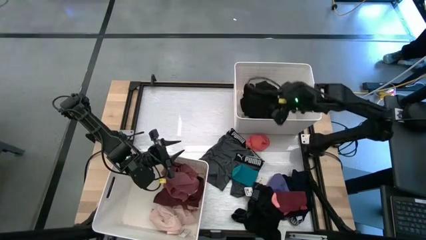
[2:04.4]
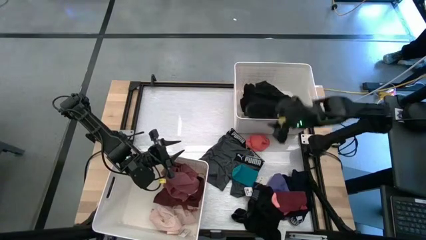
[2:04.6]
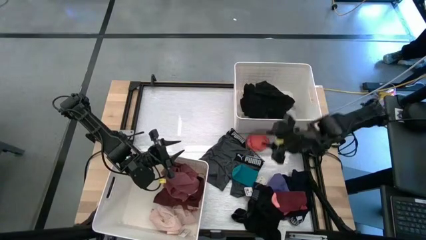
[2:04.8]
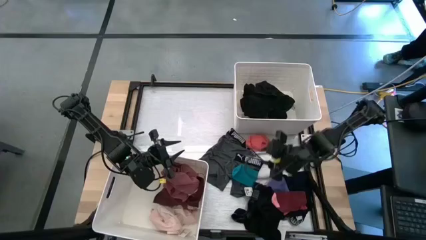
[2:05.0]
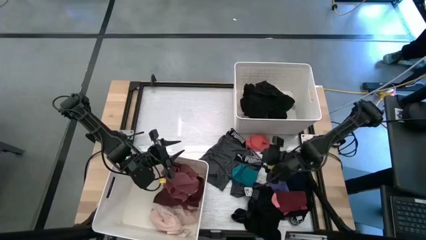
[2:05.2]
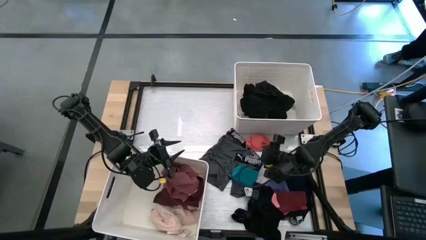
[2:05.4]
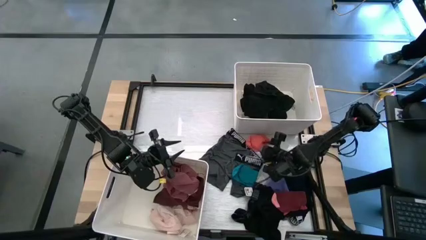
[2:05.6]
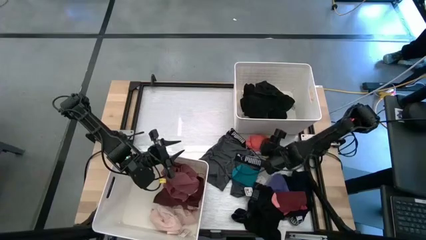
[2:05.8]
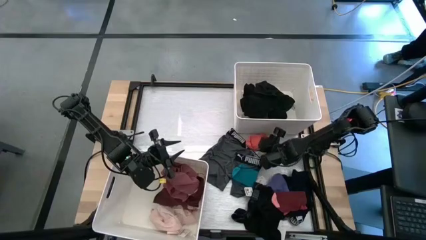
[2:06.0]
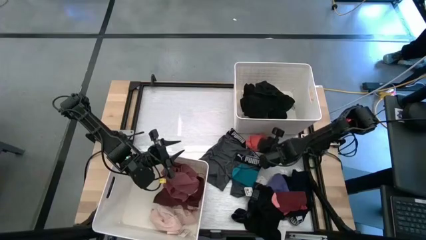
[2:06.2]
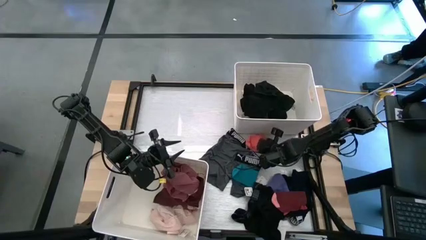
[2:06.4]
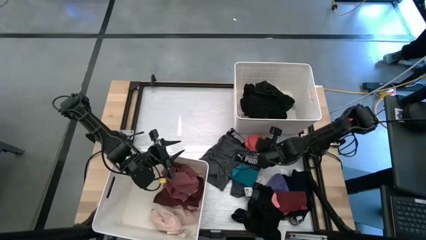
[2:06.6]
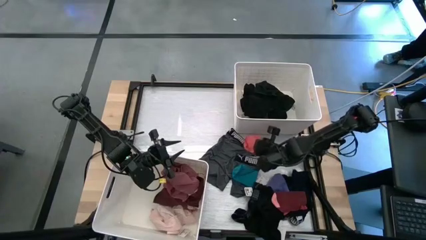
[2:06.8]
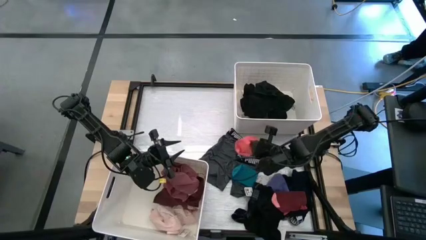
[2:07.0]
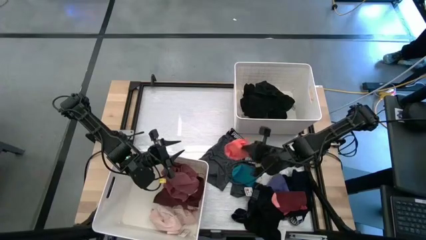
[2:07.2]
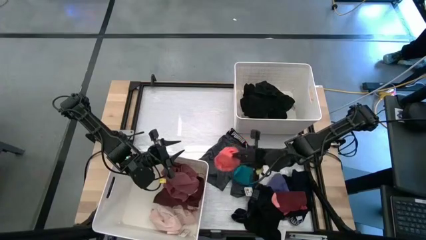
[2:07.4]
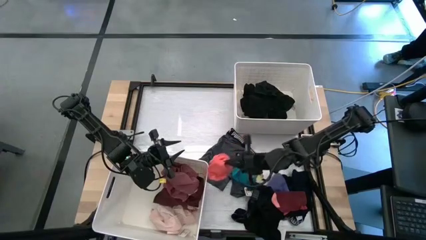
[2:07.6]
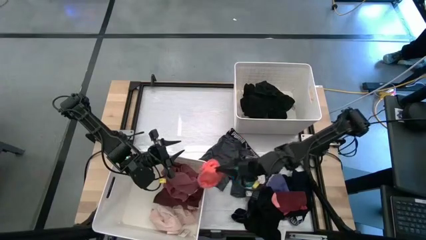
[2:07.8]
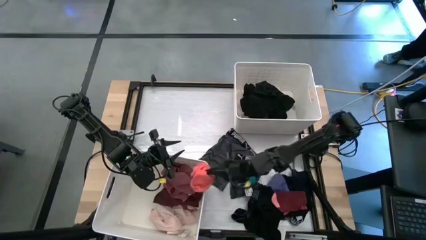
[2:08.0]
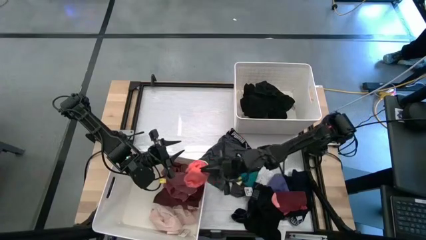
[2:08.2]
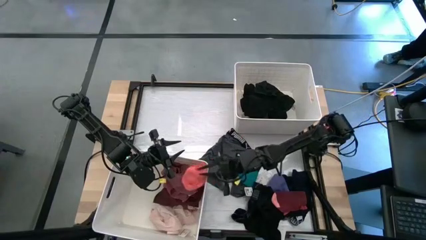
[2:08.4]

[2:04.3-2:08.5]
Task: Sort clothes
Put the pink sock into the bottom white bin

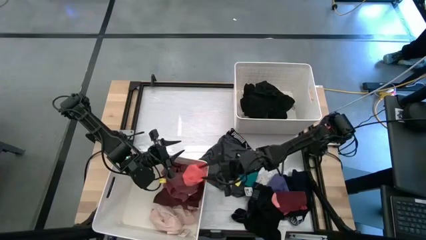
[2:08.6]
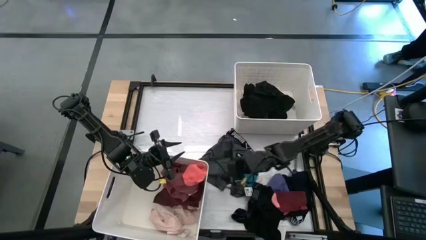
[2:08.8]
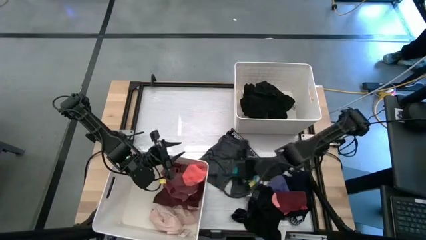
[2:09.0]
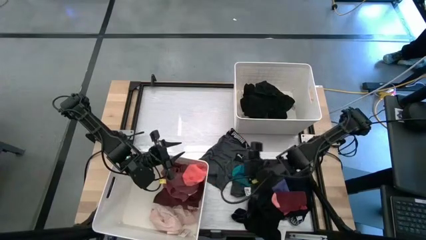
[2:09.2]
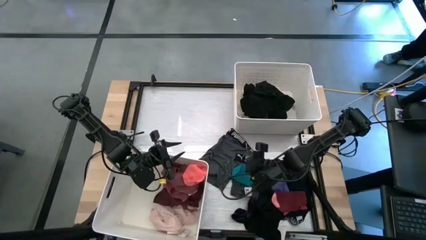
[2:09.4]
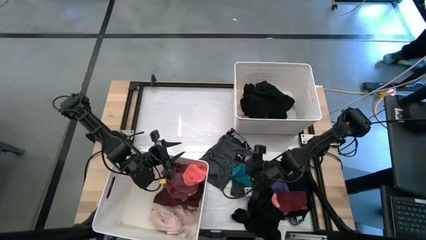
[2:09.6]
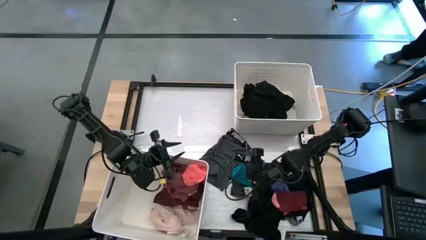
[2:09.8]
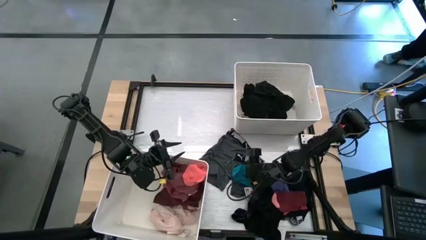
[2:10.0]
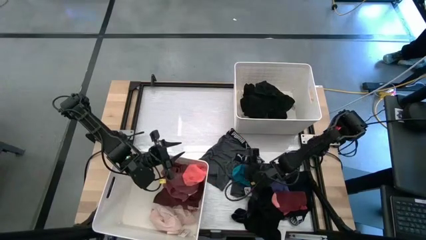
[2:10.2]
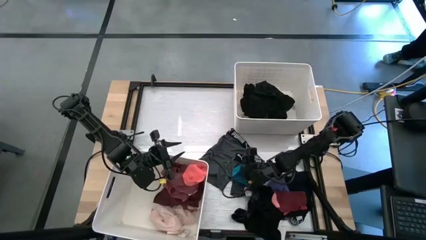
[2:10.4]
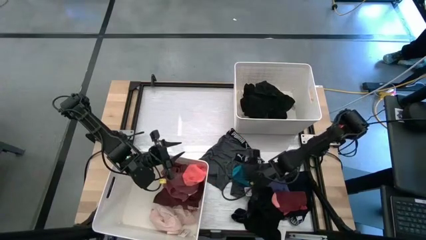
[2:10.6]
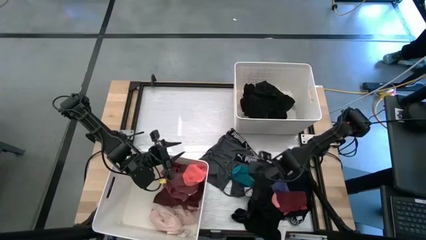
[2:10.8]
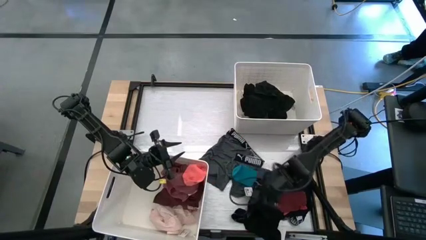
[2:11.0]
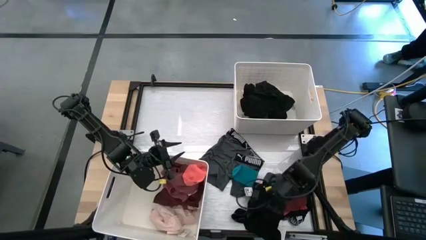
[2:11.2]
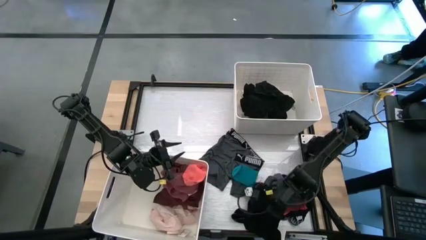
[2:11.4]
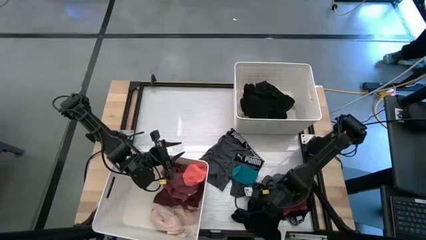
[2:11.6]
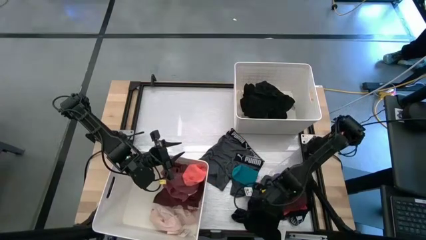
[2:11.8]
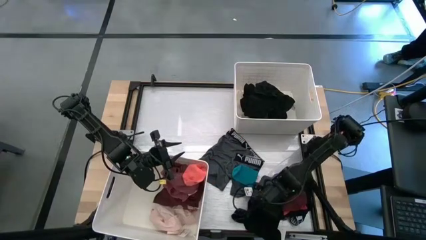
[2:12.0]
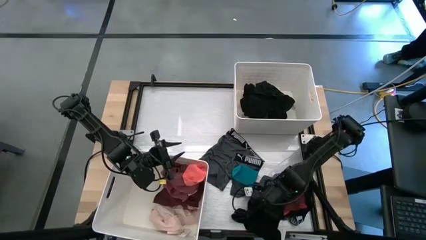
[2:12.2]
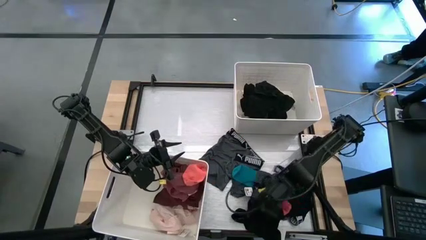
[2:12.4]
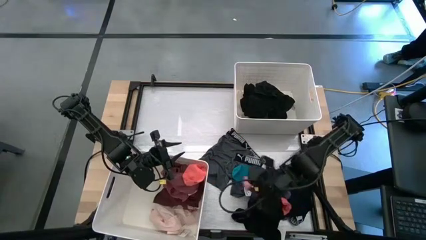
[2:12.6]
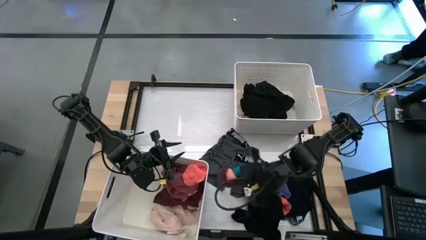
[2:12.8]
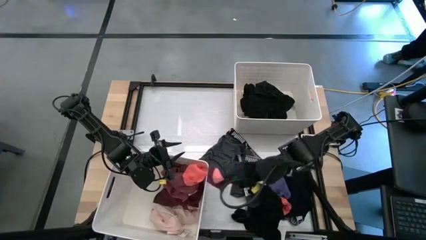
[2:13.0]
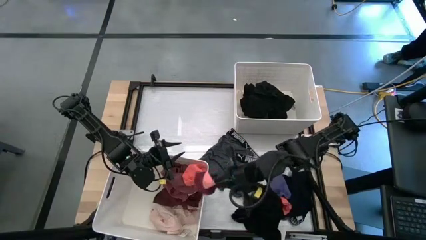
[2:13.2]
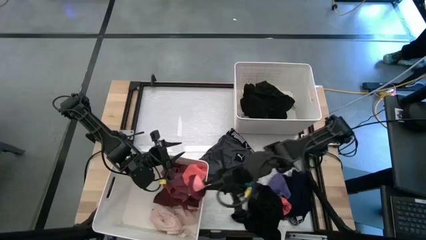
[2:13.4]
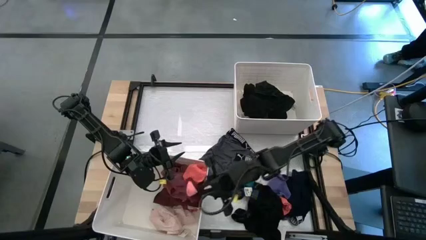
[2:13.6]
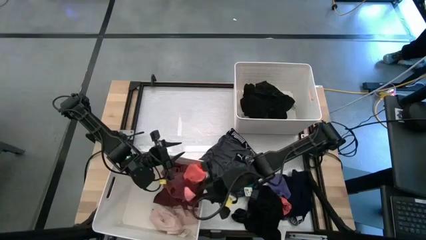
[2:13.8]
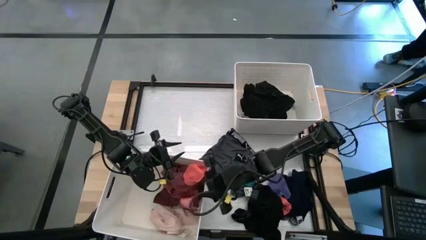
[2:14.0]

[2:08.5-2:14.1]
Put the red sock into the bottom white bin

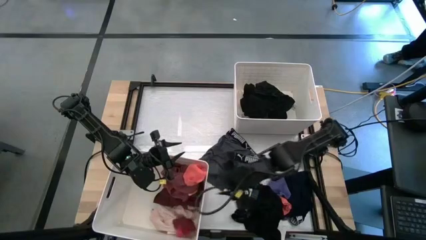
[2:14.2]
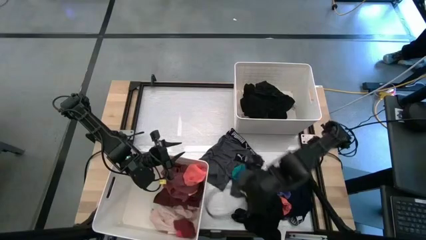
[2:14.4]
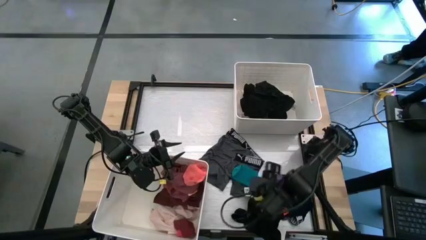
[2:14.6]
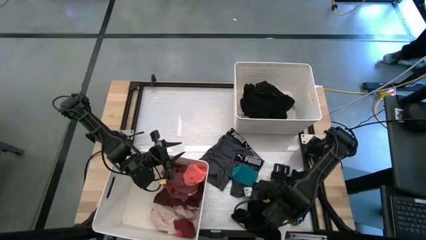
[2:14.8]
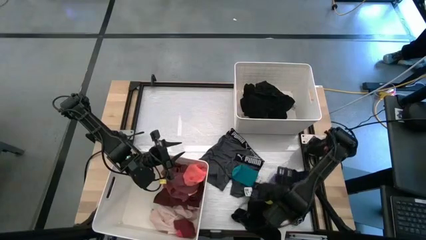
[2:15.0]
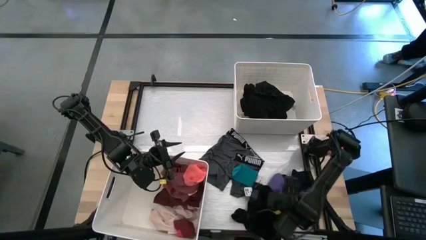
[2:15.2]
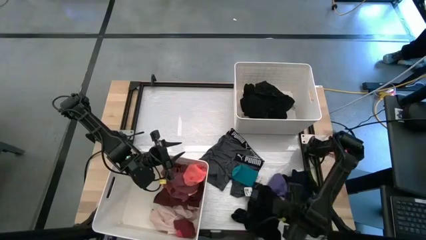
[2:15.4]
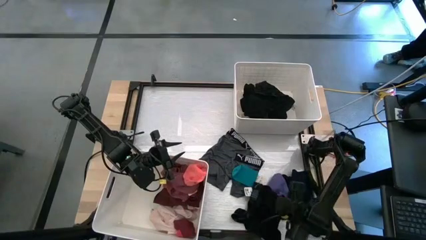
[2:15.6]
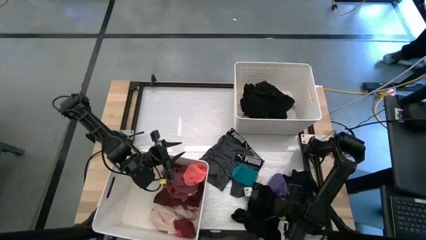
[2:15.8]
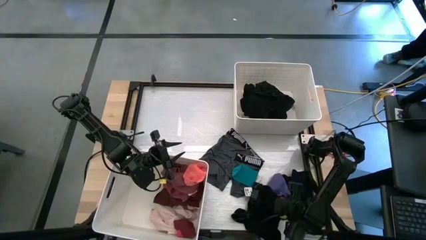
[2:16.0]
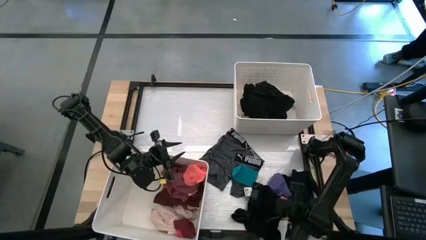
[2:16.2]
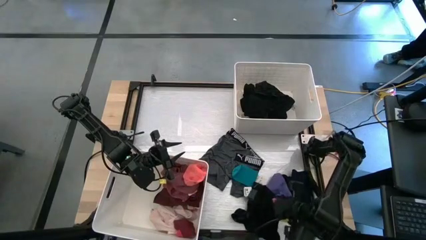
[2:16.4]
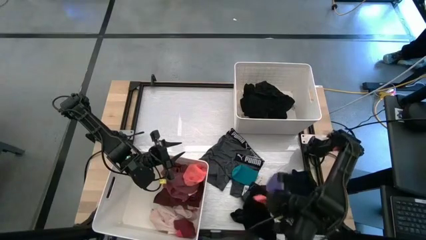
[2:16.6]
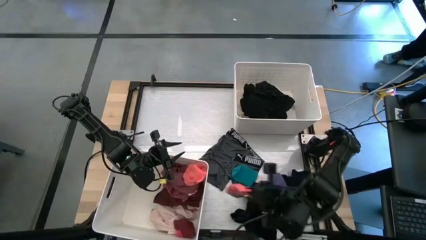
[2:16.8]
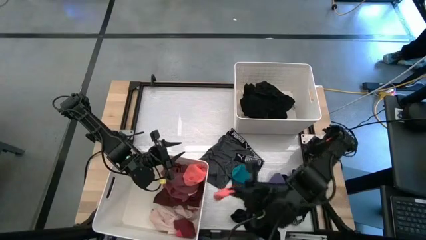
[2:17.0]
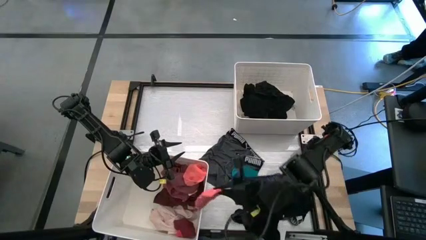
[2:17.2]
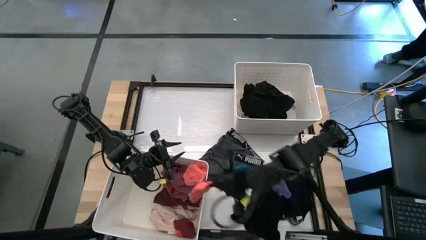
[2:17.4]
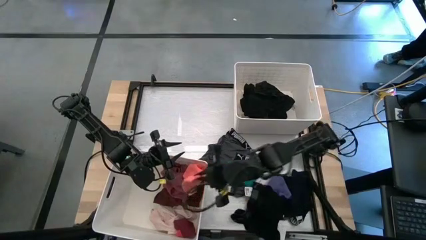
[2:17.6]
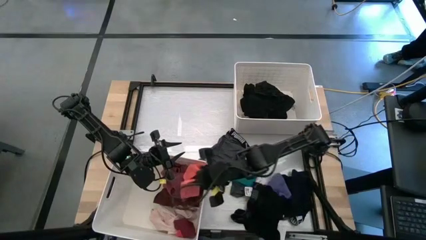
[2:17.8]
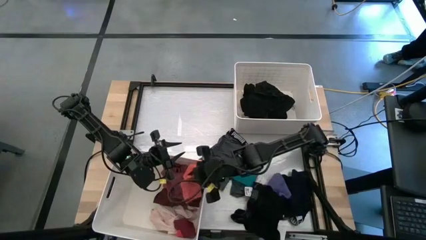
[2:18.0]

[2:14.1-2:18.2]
Put the pink sock into the bottom white bin

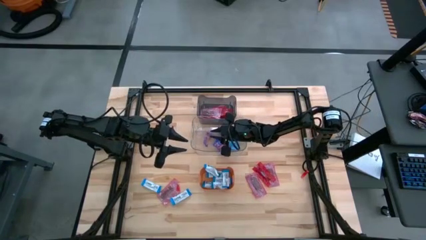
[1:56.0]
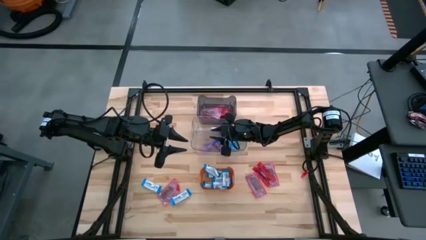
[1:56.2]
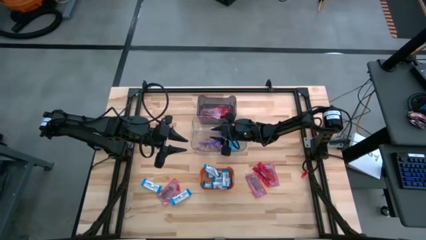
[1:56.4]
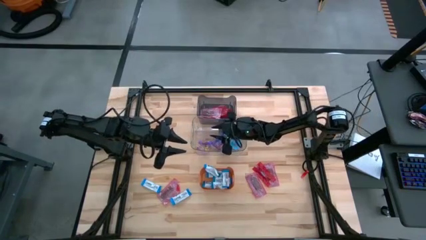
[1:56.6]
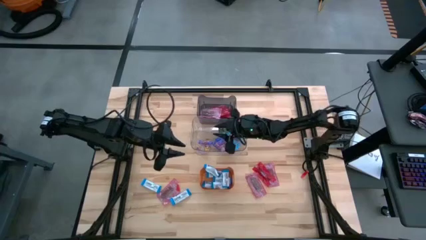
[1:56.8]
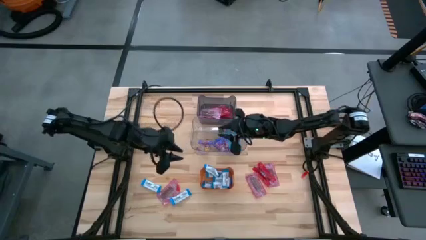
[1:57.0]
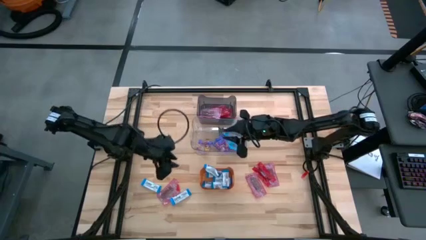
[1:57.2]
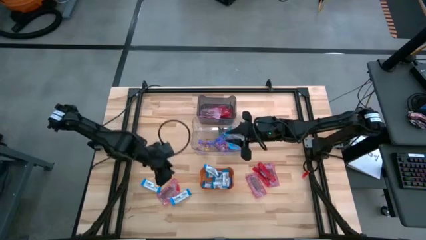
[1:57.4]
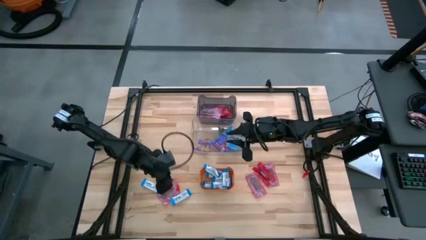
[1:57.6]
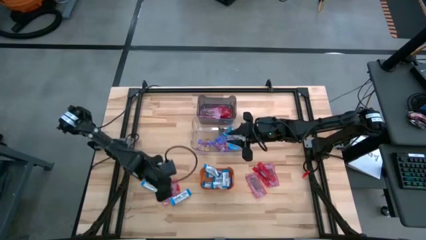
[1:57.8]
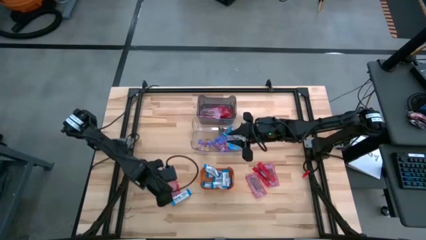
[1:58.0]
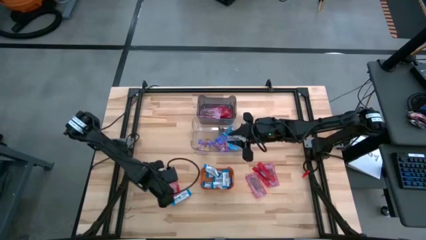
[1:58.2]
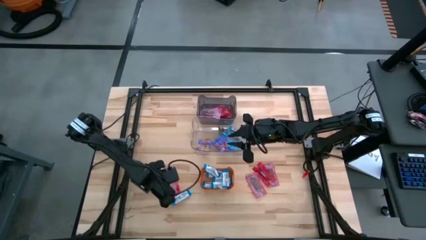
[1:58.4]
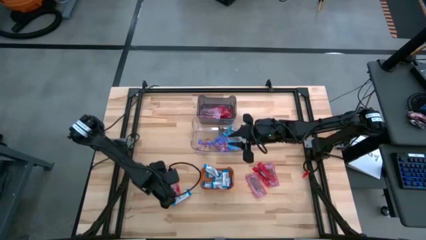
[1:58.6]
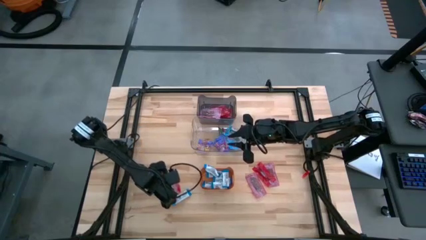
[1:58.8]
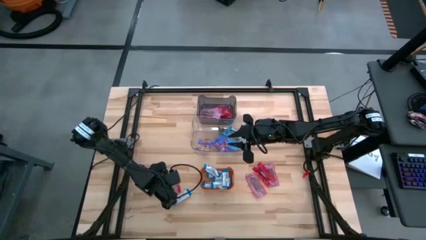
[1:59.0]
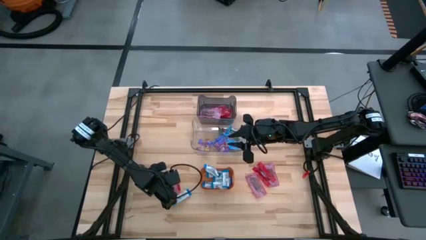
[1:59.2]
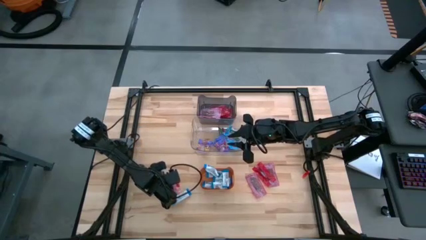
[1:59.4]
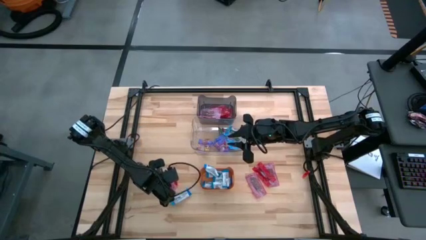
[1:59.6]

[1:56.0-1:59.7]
Task: Sort candy
Put the red candy into the black transparent bin
